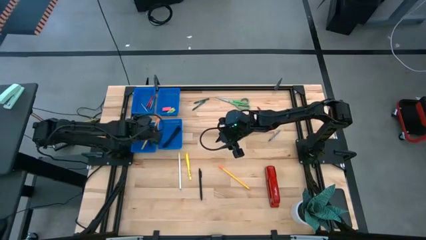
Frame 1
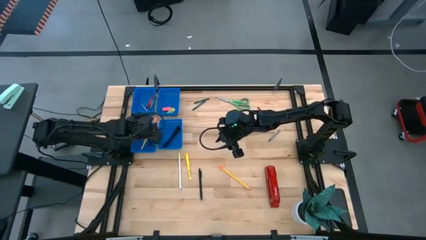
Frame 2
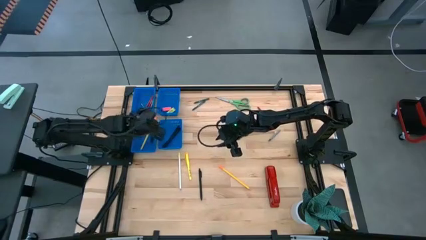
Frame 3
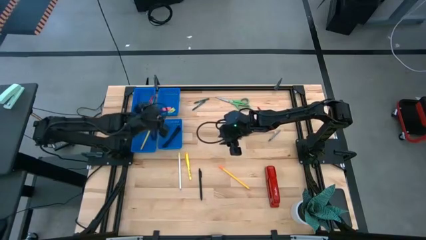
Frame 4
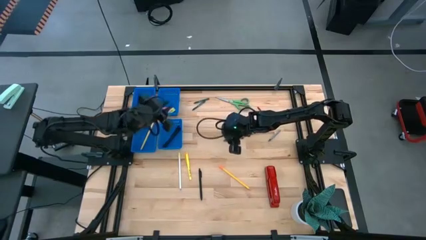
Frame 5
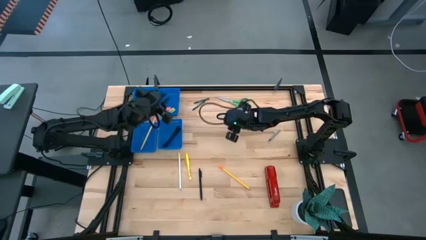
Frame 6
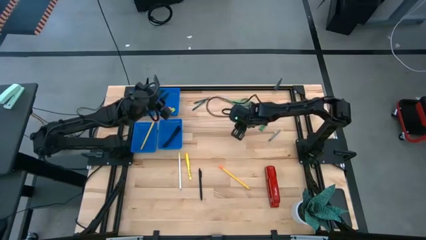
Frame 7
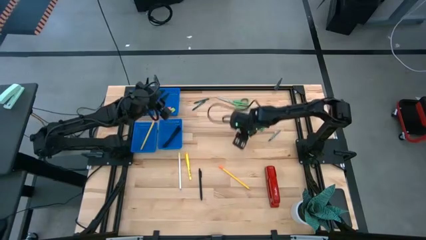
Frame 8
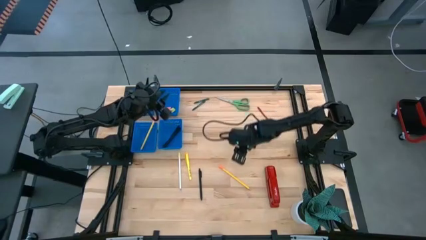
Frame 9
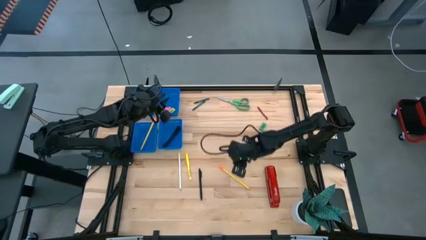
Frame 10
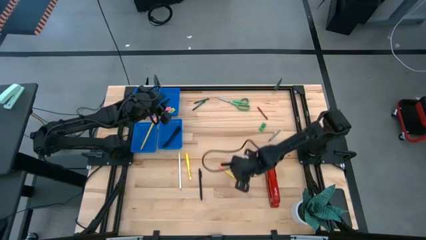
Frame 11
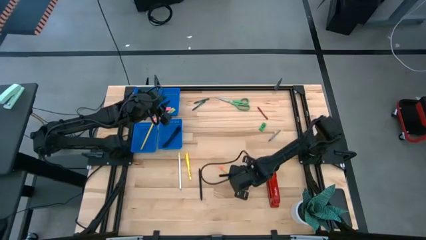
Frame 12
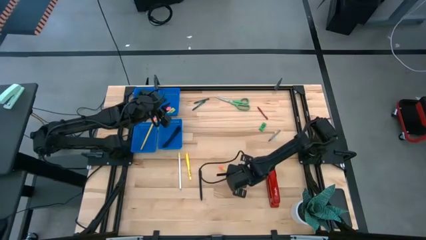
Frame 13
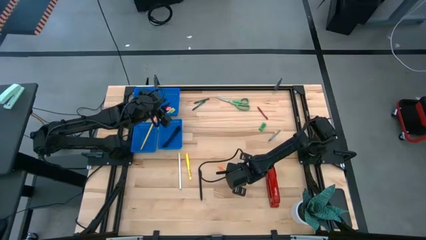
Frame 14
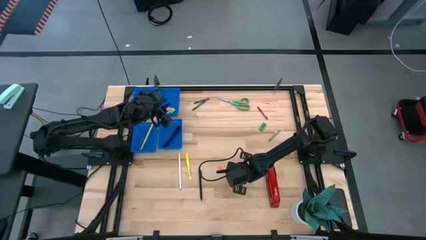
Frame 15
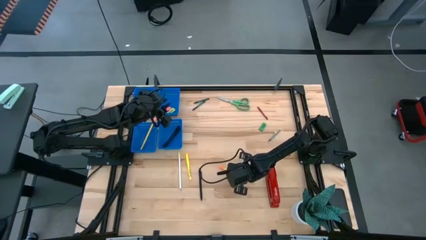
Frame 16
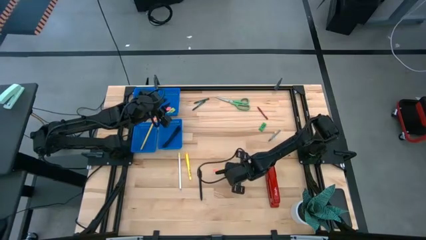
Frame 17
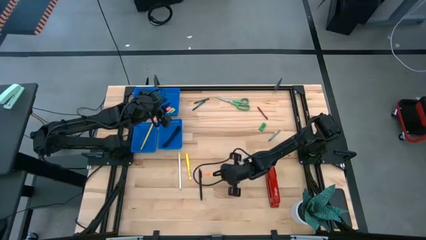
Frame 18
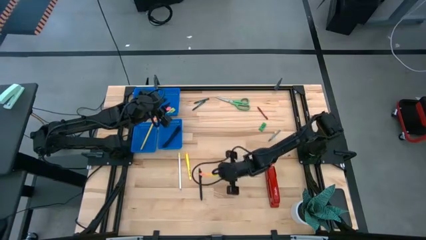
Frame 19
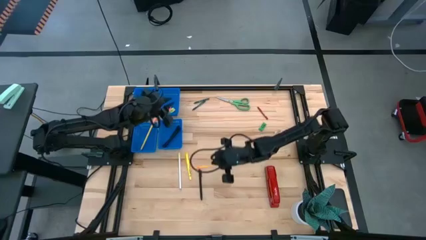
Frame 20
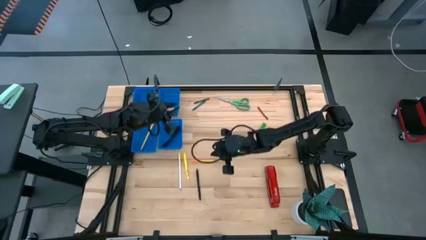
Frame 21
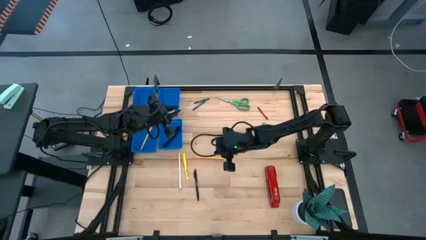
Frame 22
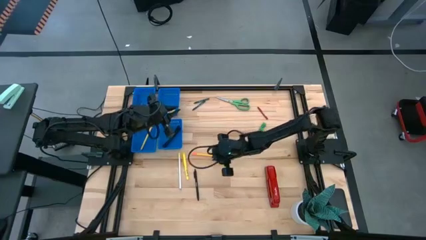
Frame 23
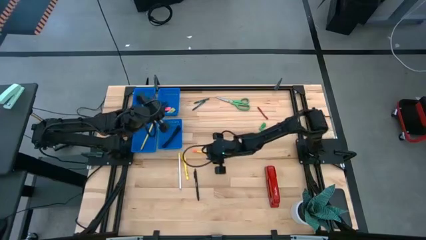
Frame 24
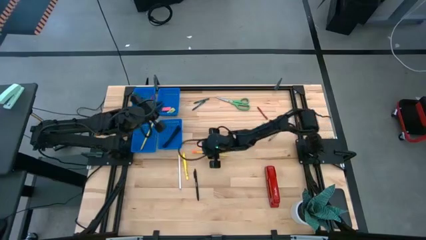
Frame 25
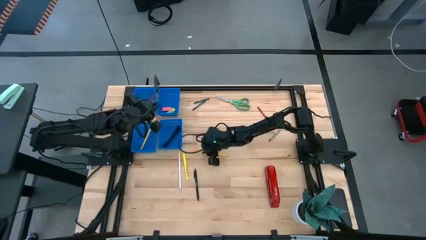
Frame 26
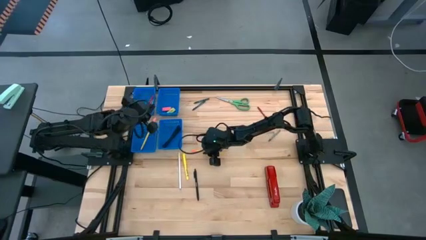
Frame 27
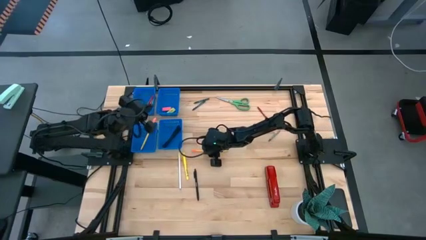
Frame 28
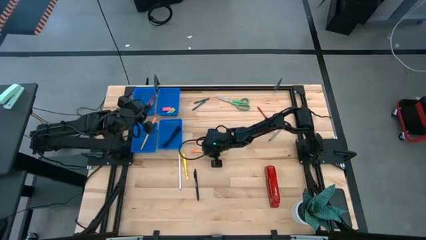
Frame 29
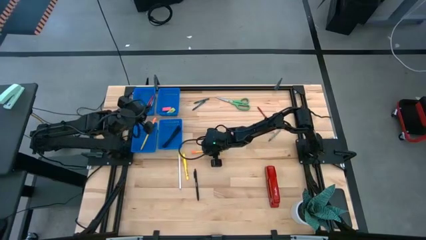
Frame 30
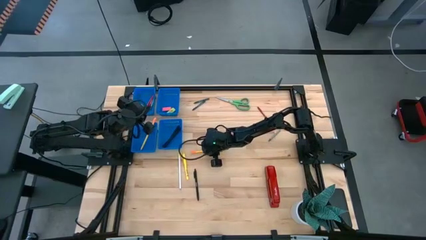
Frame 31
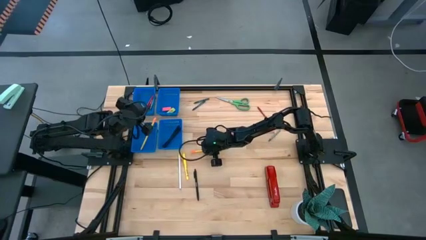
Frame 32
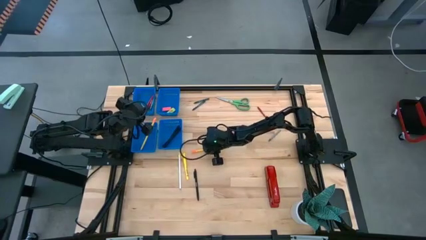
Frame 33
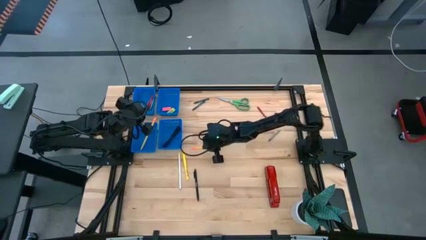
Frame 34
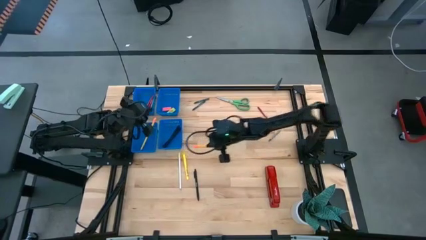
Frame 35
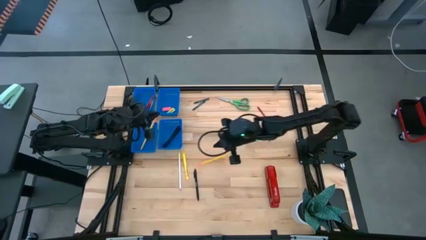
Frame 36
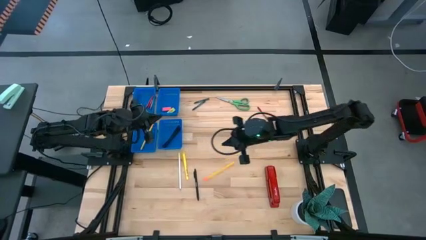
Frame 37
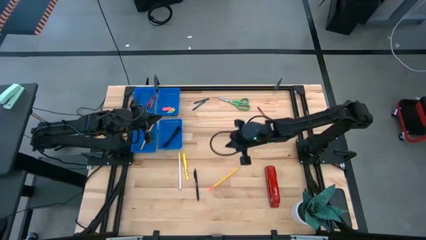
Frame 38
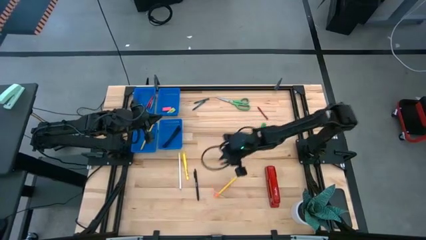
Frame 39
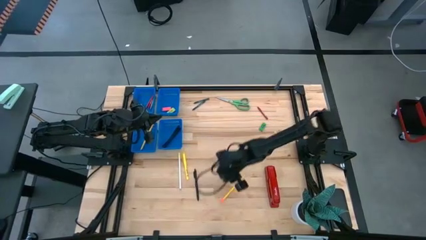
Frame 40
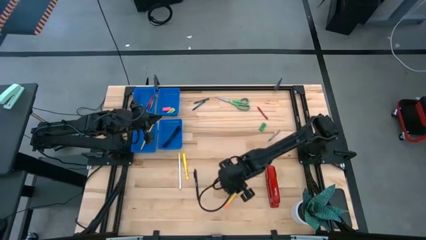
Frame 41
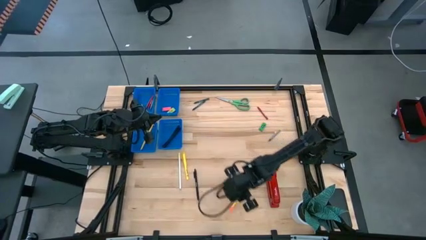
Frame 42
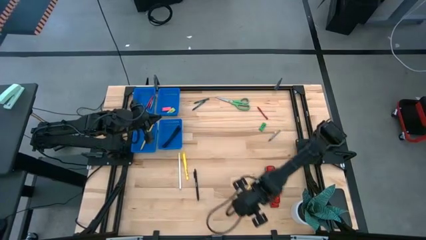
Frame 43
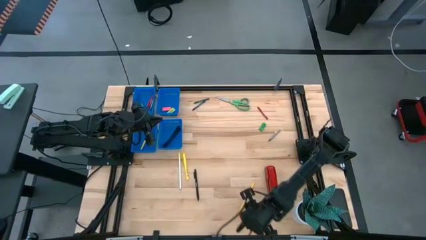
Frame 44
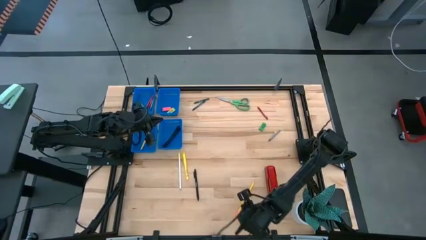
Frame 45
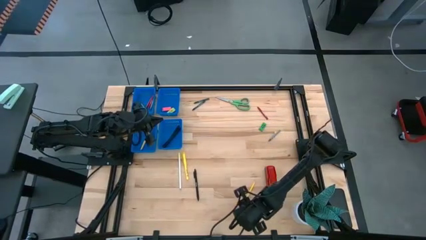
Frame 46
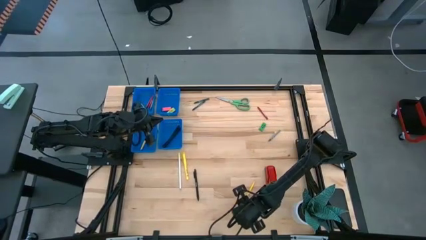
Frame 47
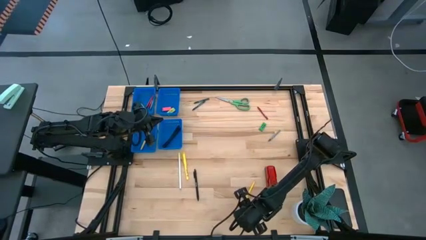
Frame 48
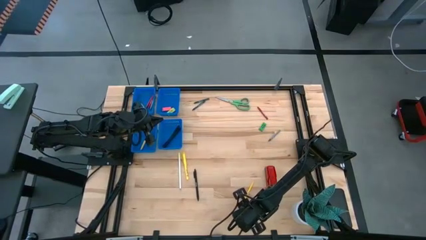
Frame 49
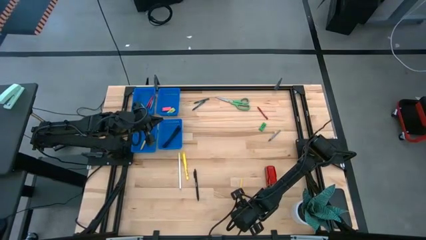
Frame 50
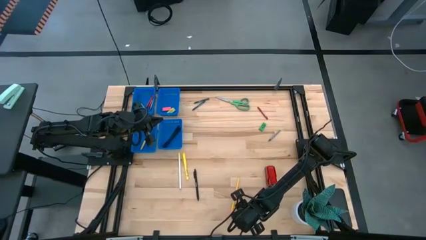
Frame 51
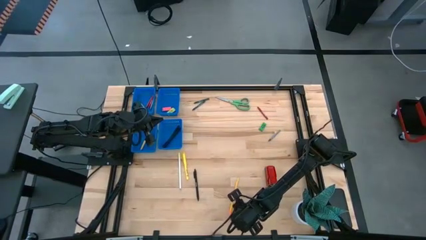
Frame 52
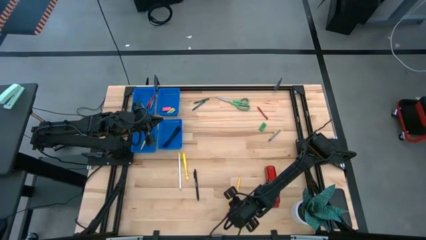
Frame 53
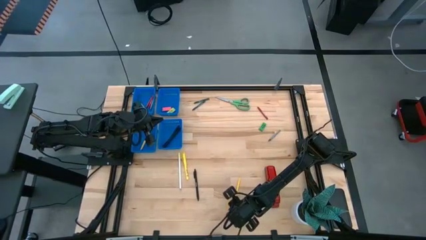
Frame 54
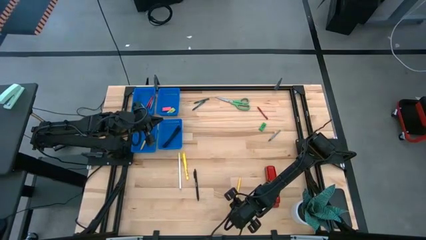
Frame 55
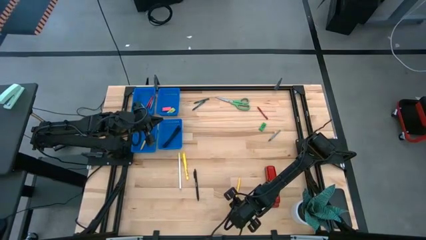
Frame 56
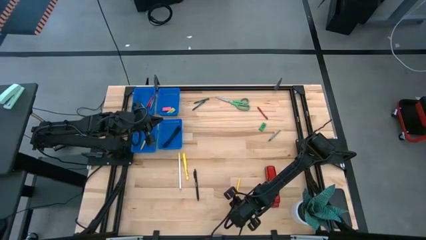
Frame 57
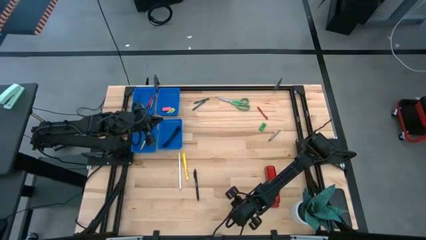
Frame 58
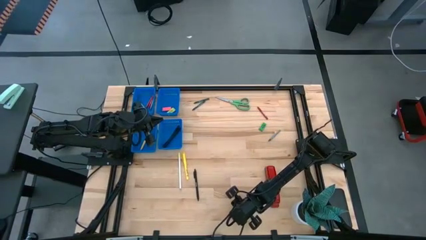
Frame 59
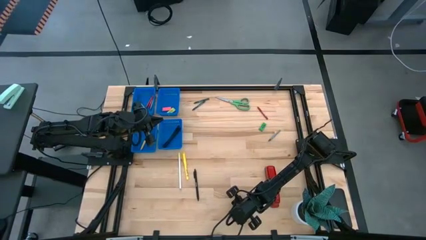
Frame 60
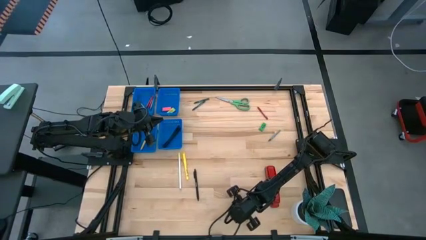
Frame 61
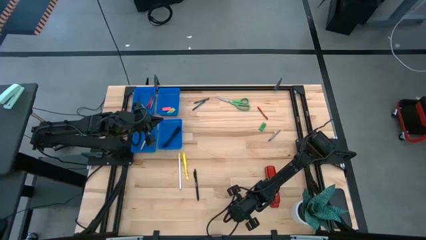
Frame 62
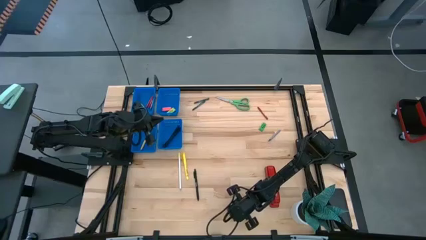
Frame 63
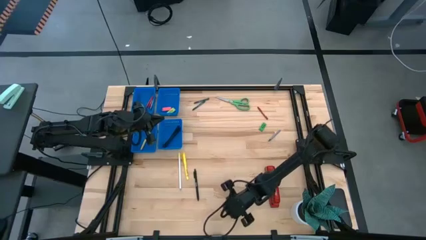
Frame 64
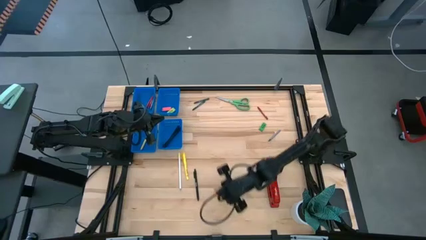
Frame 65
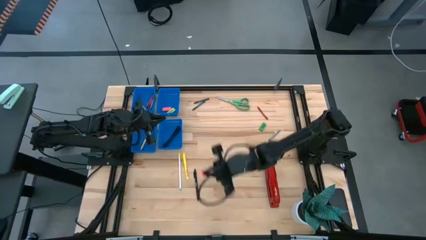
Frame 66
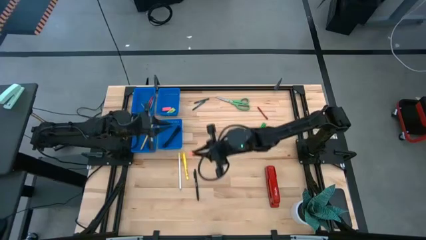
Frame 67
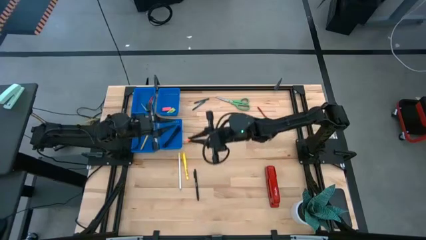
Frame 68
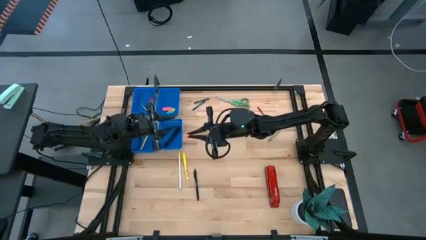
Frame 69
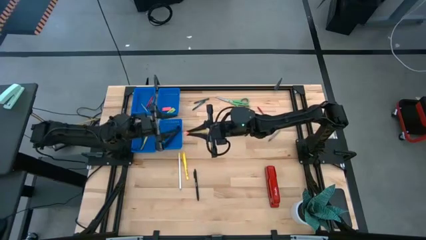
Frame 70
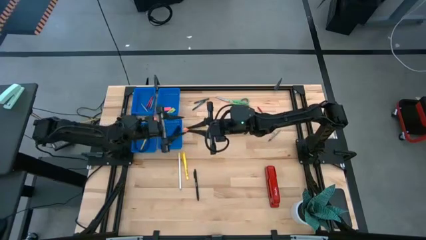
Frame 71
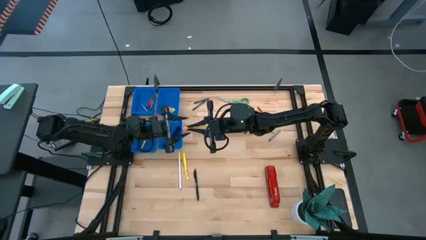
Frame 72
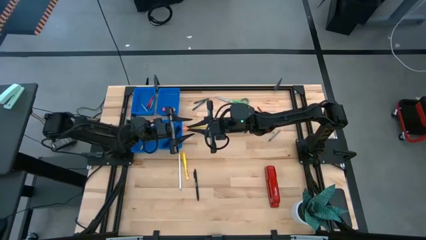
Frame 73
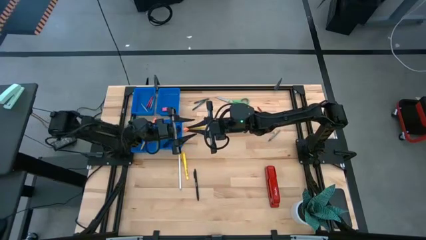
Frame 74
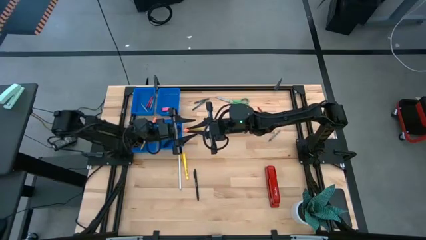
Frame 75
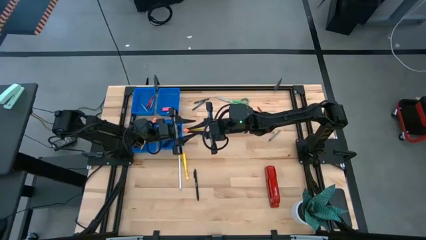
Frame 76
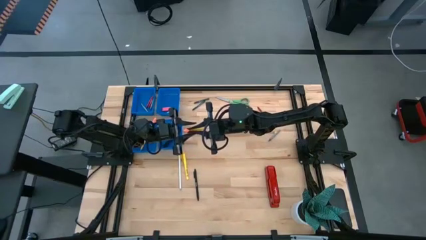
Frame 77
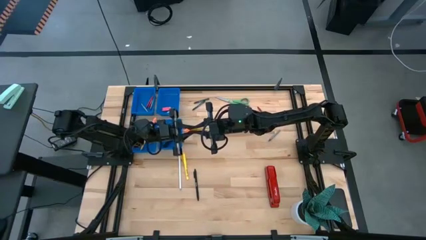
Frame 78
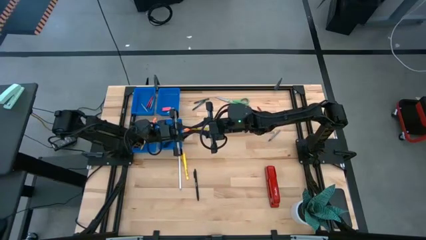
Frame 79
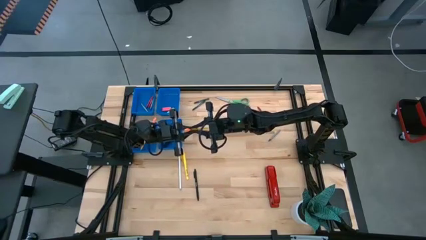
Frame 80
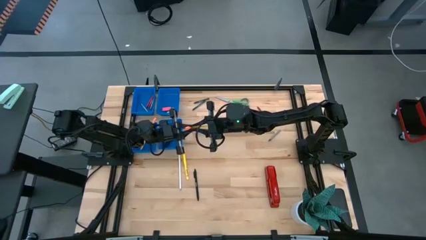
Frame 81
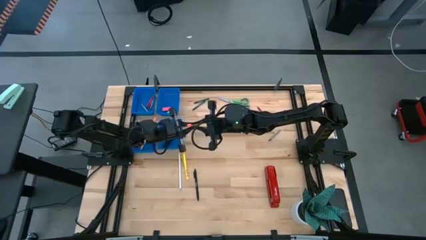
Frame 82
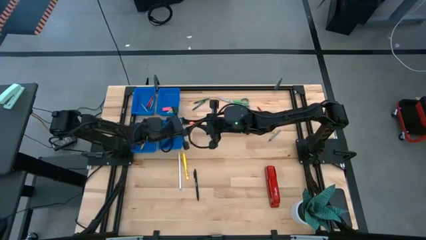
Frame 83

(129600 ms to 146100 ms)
Task: Sort crayons/erasers/pens/pencils in bins
Put the yellow pencil into the bottom left blue bin
